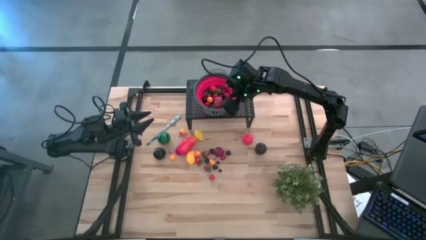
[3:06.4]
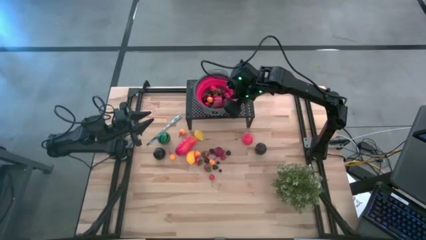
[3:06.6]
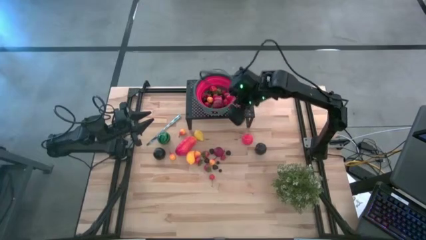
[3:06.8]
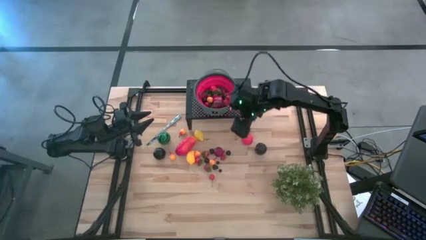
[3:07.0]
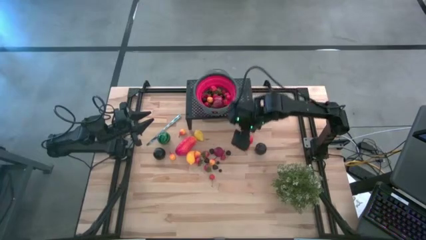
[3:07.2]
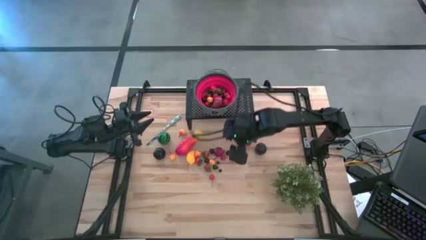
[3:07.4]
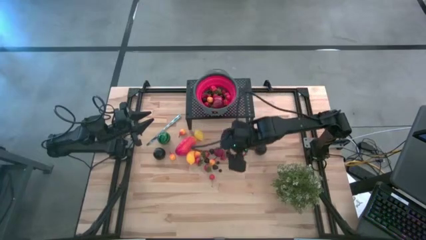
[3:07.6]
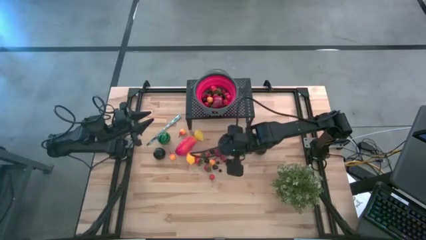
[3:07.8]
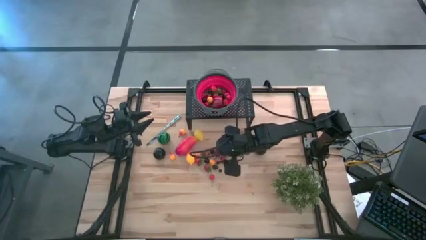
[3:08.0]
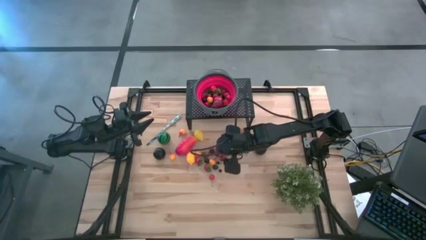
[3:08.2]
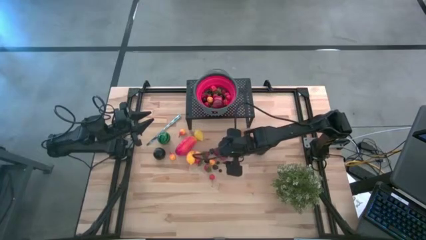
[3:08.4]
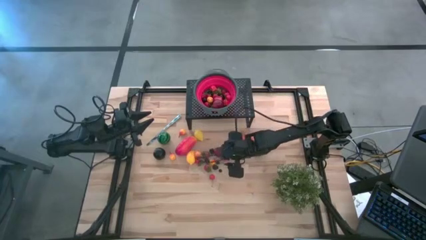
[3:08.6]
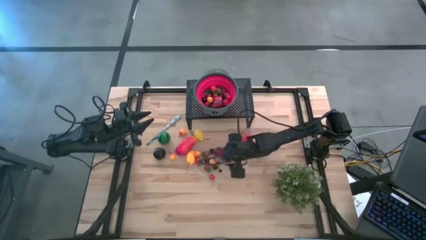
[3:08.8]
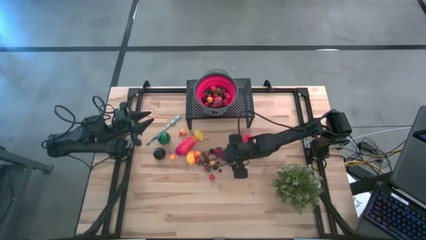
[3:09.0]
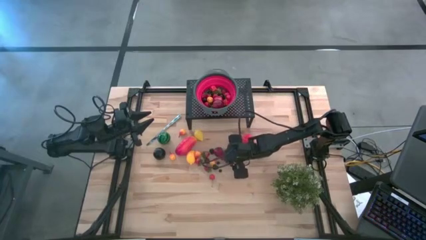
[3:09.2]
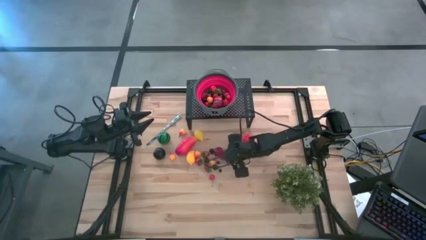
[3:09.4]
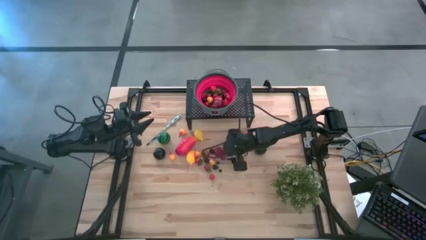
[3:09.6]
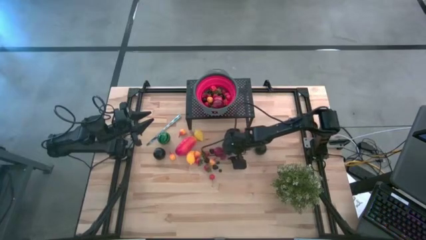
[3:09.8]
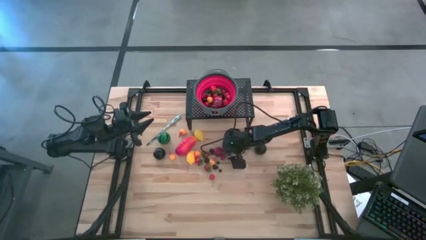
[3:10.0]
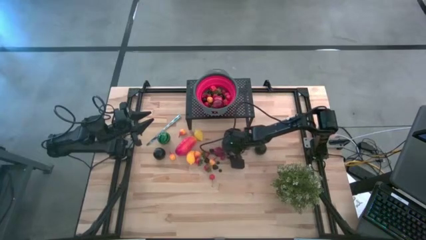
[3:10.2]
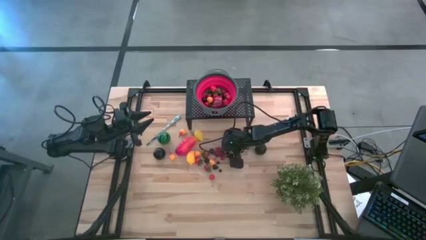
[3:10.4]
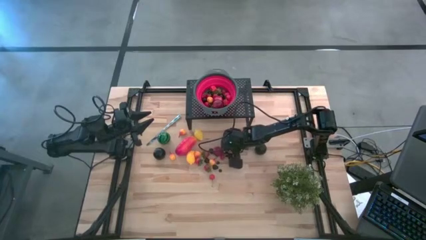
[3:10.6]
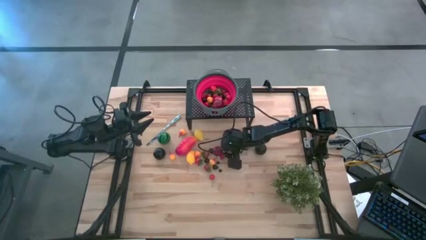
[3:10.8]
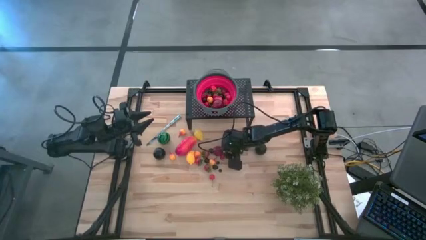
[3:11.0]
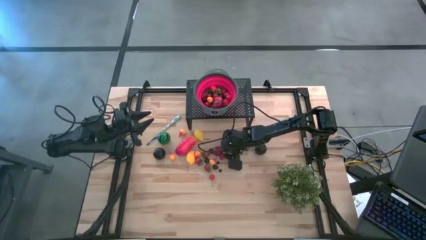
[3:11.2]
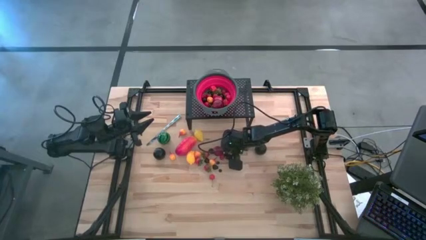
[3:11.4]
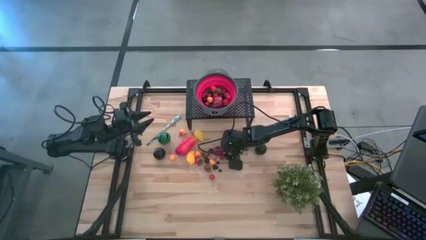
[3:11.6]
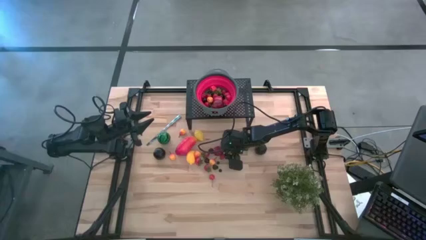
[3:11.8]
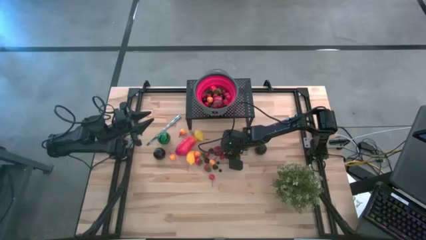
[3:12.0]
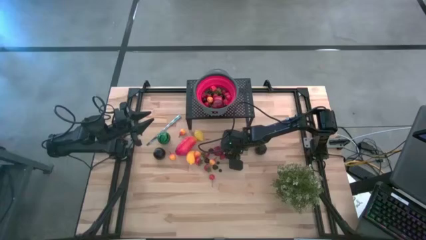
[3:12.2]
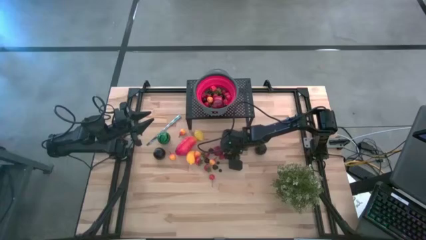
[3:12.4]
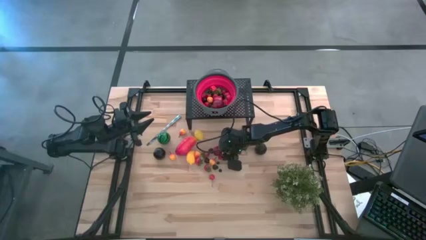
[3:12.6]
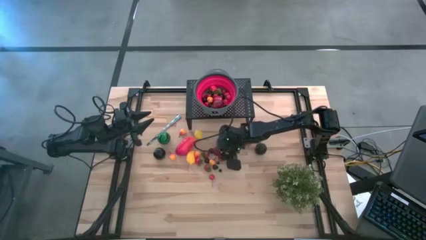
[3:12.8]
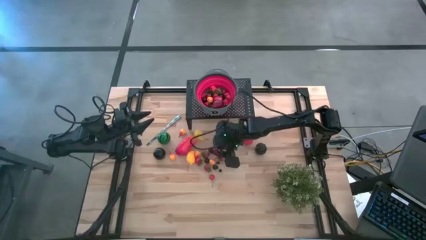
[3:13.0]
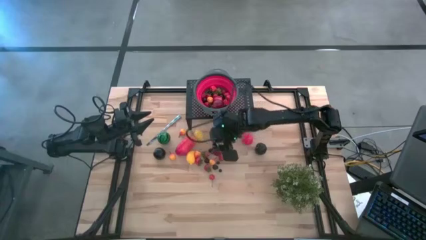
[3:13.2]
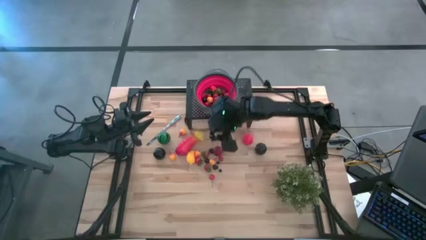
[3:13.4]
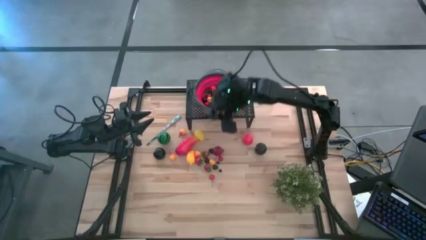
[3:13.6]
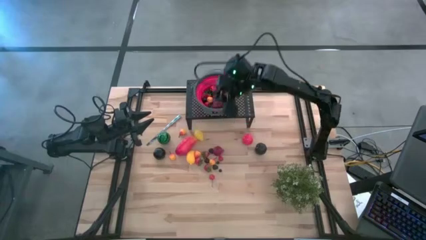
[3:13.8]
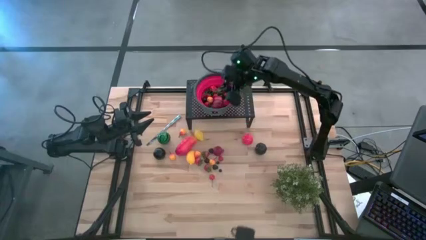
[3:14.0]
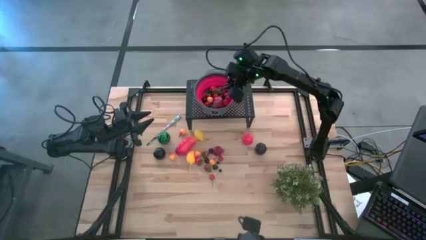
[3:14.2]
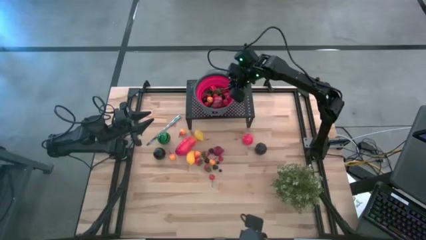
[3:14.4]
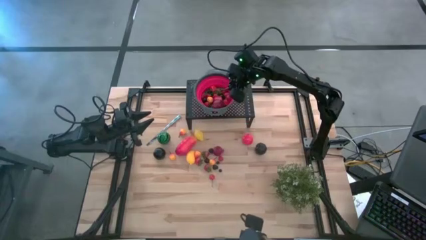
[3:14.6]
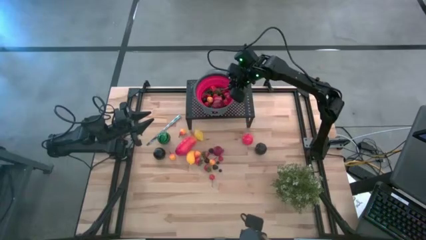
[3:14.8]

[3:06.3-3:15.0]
Task: Pick & Place Fruit
Put the black cherry in the red colander on the shelf

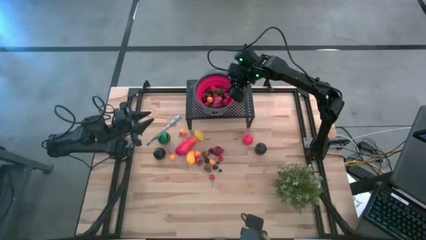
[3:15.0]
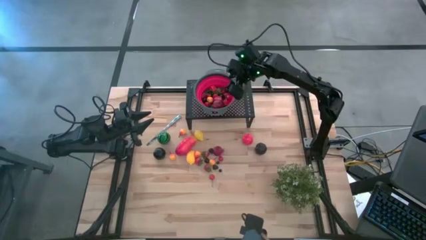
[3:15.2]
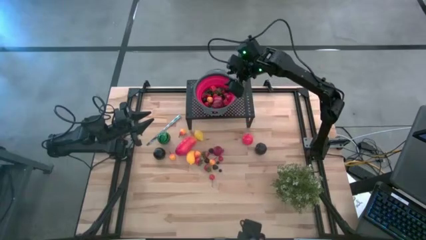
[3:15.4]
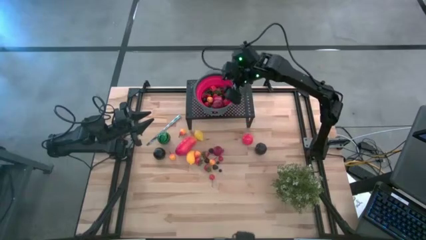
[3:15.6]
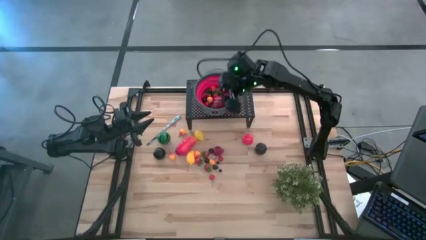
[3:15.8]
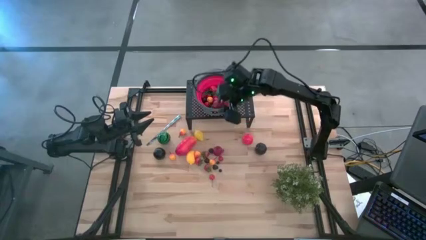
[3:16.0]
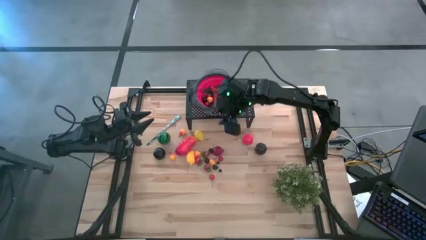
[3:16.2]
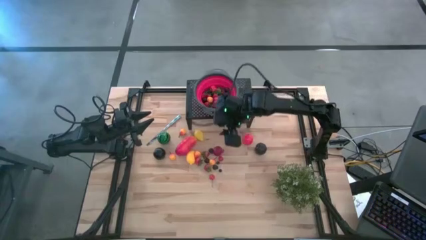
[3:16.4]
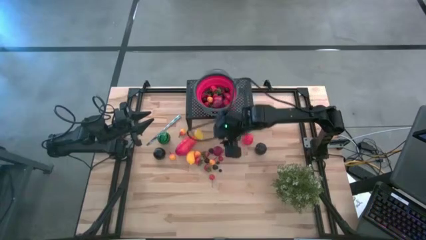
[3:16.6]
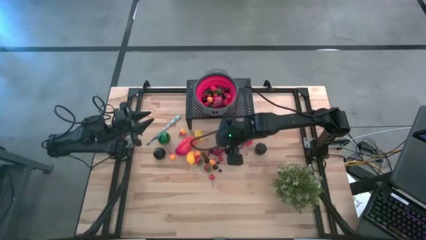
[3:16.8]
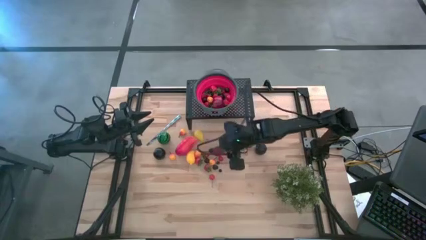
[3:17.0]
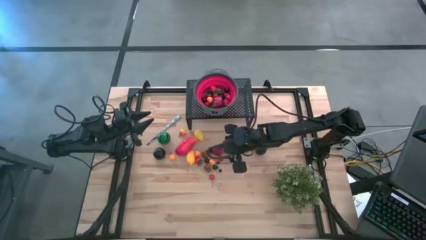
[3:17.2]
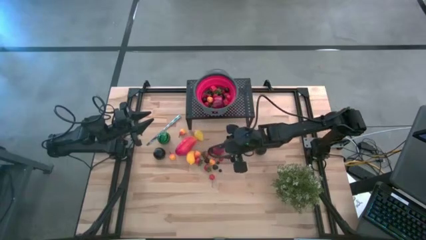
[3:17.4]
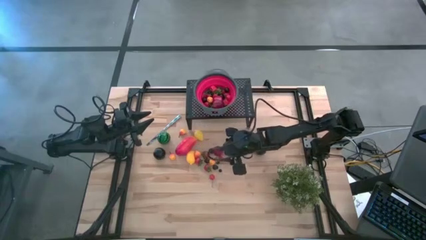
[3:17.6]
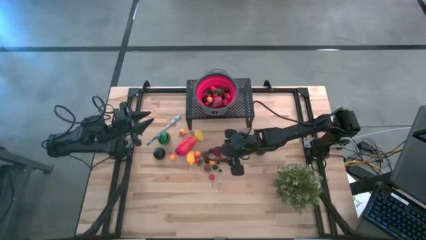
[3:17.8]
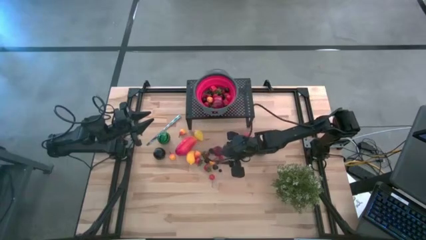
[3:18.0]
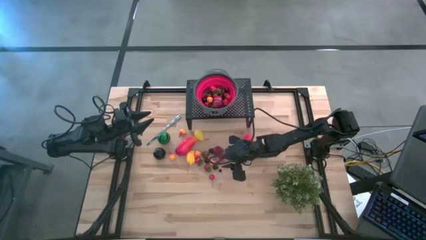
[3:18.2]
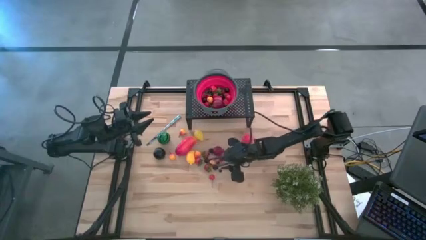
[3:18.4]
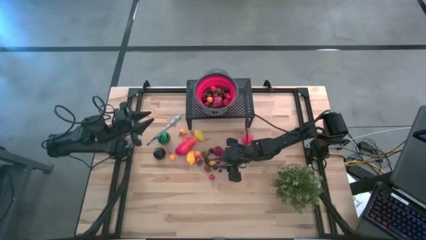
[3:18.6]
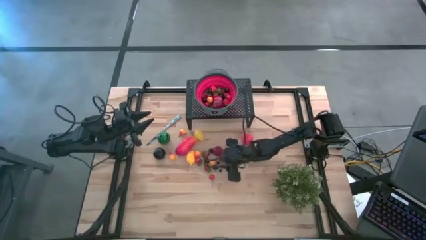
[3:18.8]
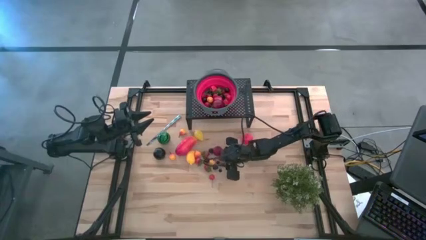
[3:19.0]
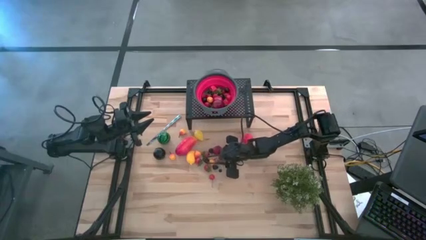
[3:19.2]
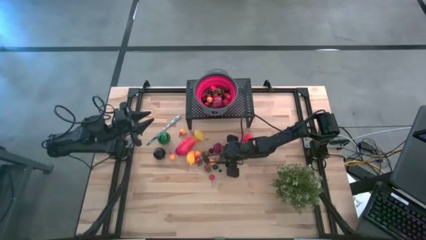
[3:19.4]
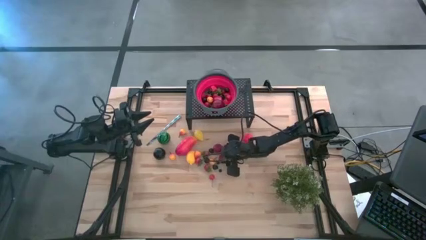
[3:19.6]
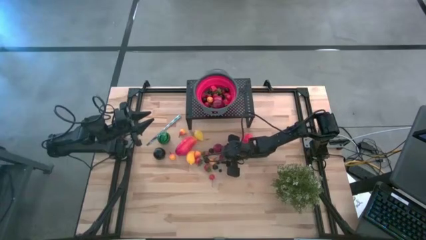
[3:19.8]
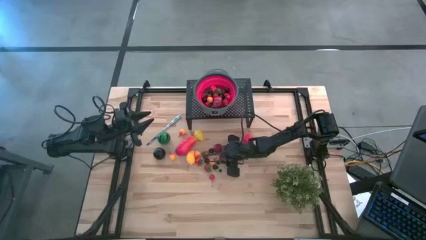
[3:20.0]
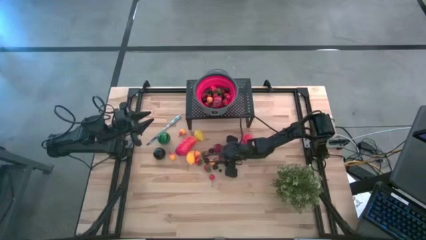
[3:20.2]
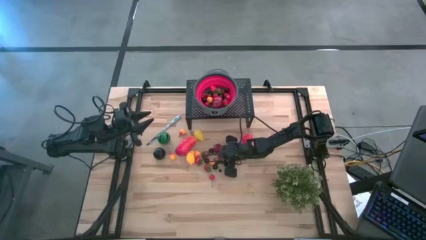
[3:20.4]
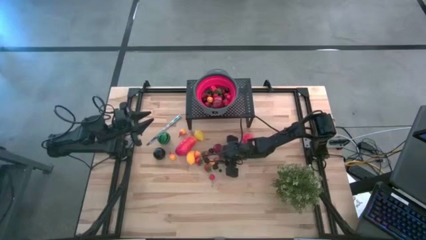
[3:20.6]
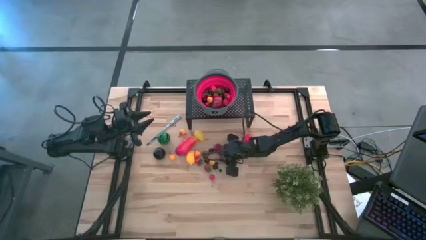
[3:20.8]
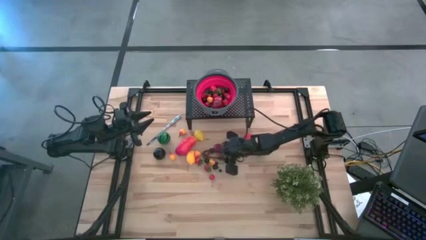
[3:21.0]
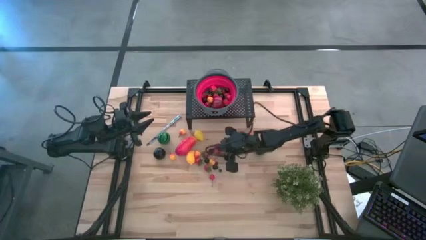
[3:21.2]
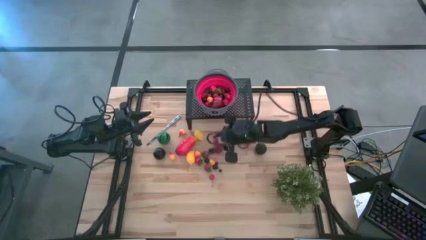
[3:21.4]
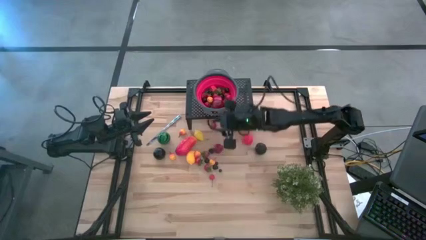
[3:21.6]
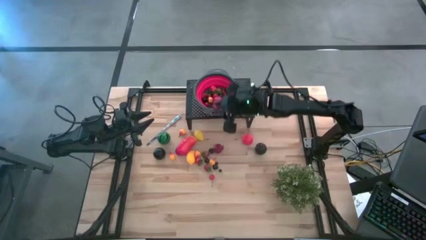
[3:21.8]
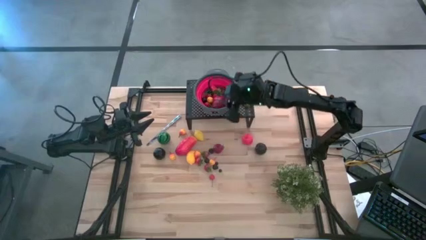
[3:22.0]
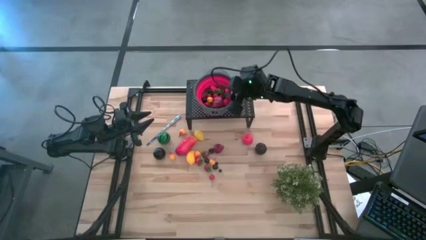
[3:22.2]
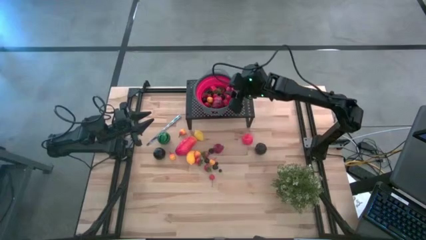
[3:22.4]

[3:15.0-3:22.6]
Put the raspberry in the red colander on the shelf
